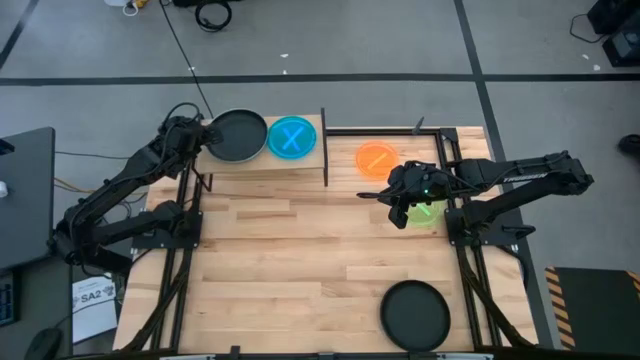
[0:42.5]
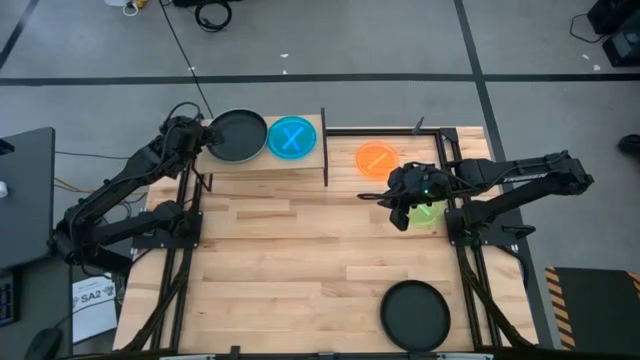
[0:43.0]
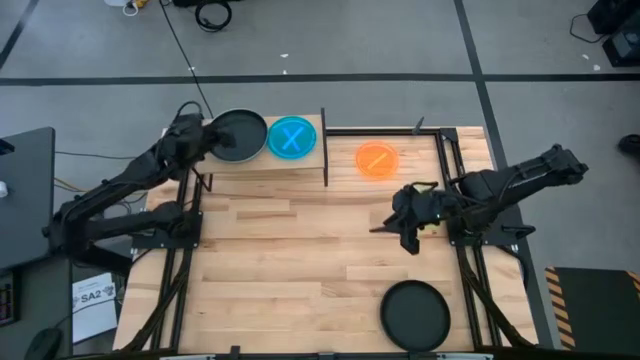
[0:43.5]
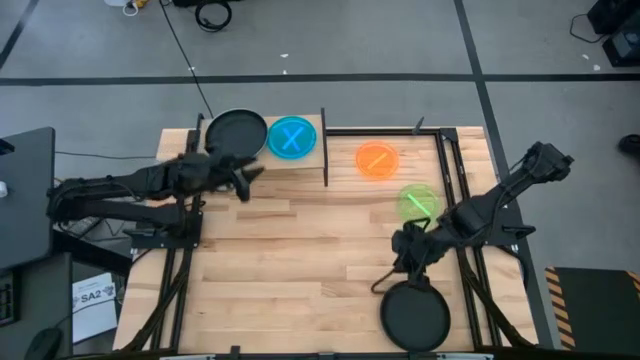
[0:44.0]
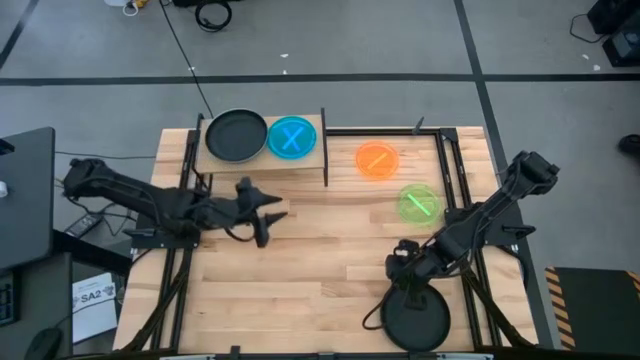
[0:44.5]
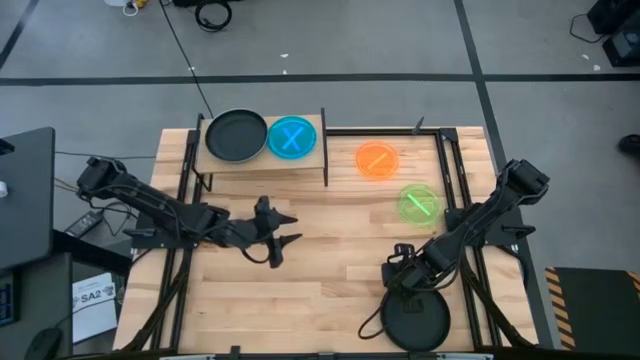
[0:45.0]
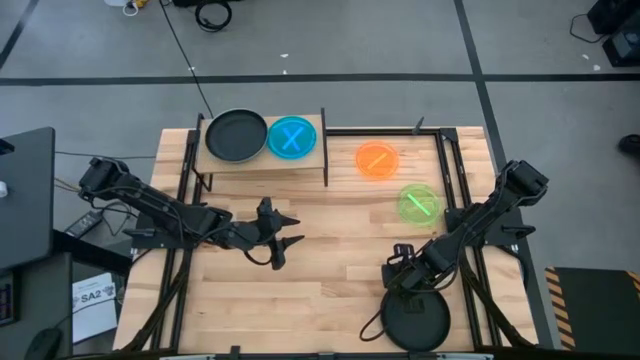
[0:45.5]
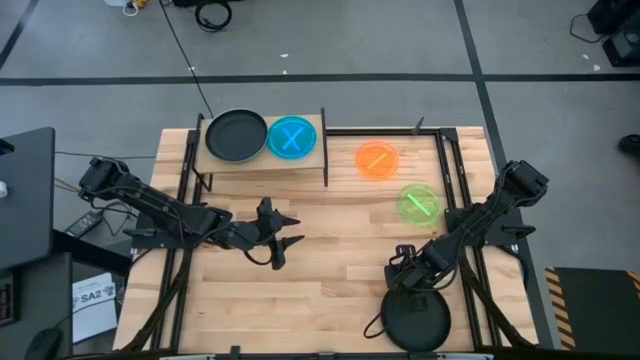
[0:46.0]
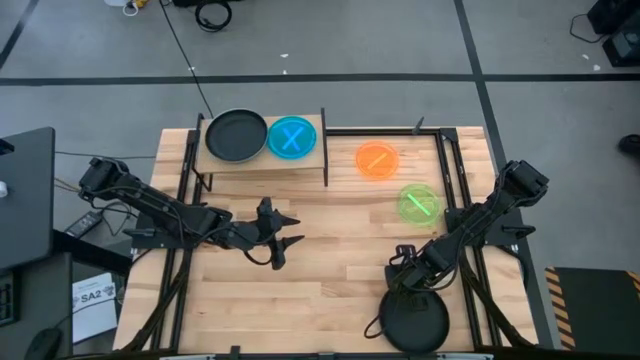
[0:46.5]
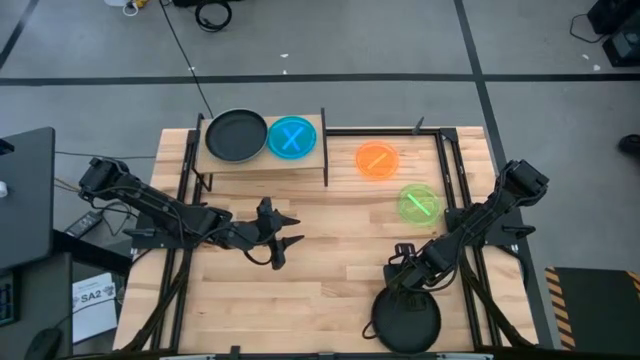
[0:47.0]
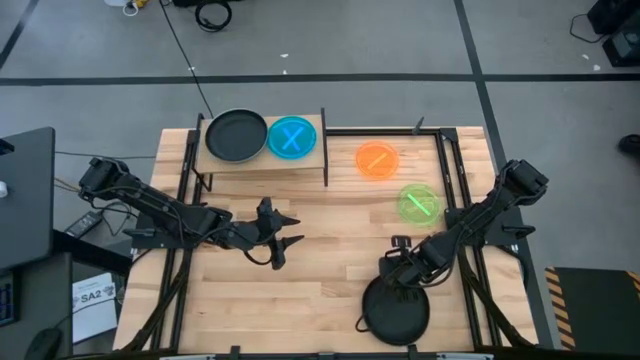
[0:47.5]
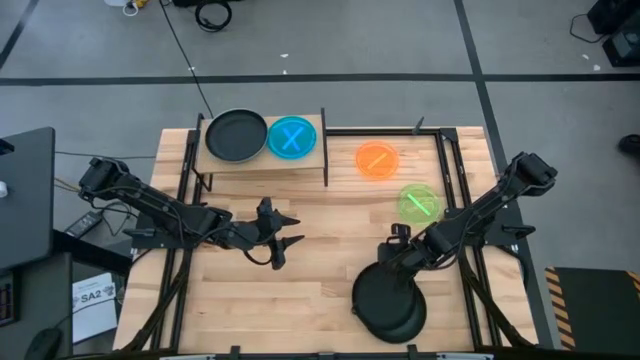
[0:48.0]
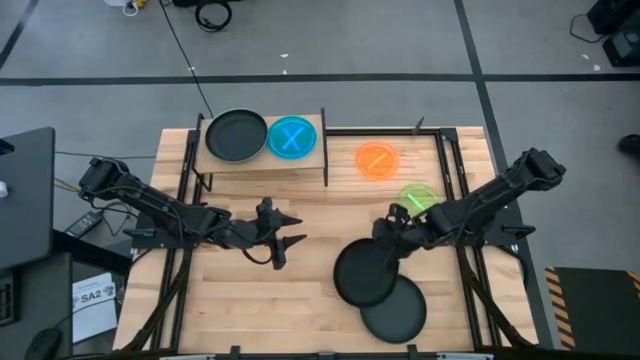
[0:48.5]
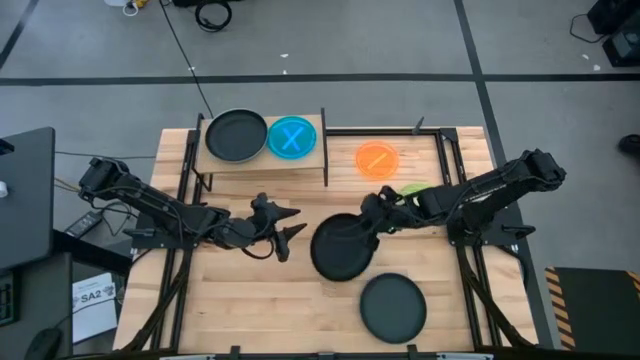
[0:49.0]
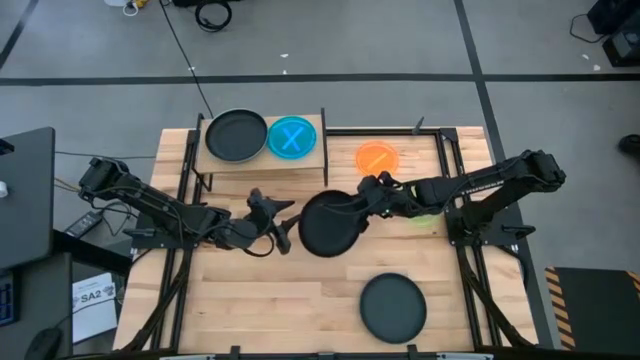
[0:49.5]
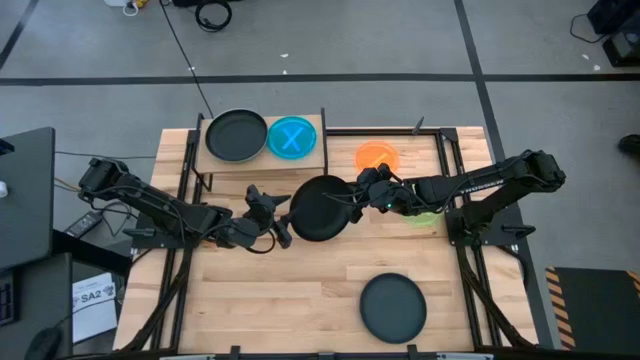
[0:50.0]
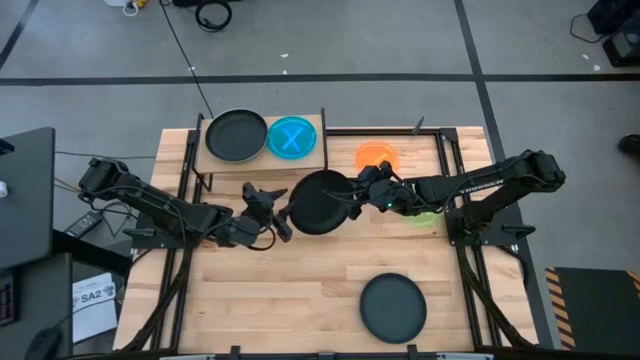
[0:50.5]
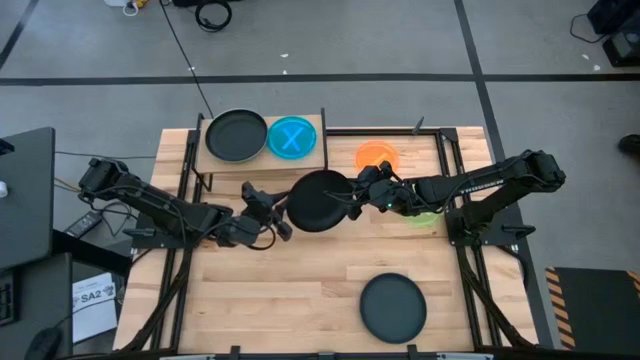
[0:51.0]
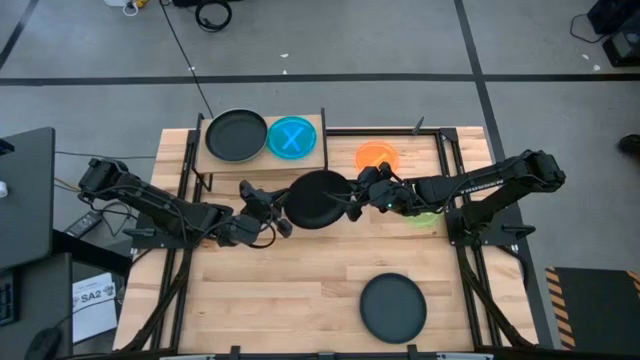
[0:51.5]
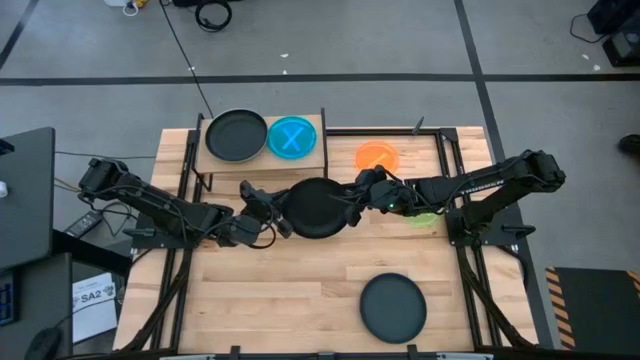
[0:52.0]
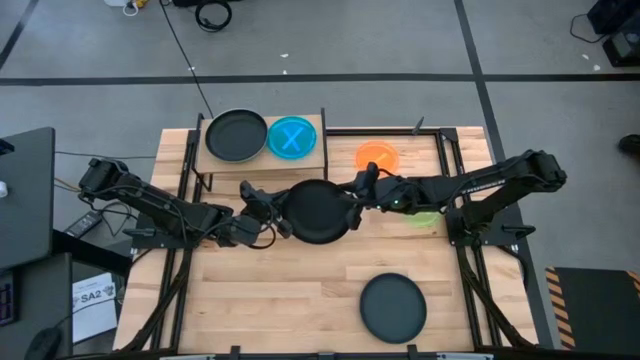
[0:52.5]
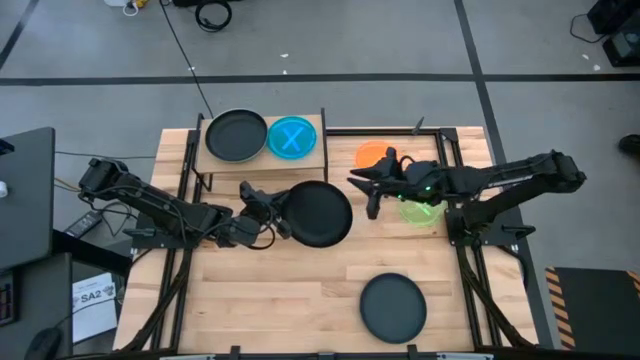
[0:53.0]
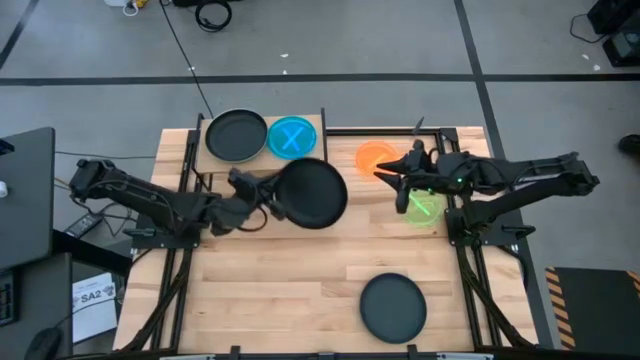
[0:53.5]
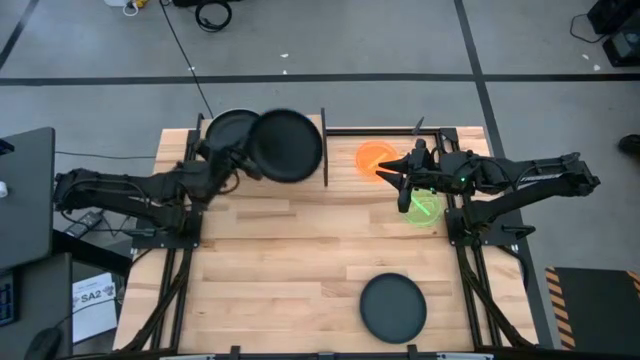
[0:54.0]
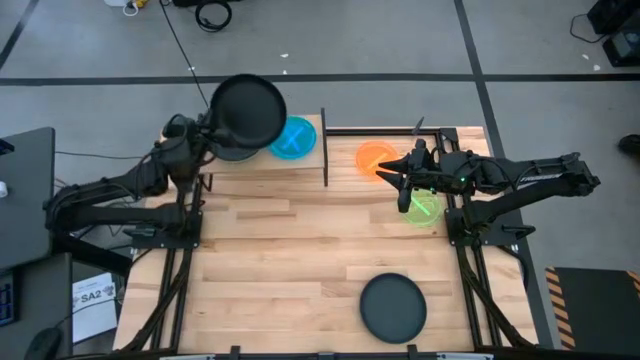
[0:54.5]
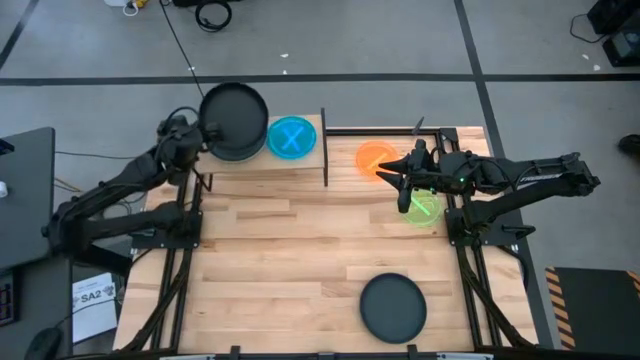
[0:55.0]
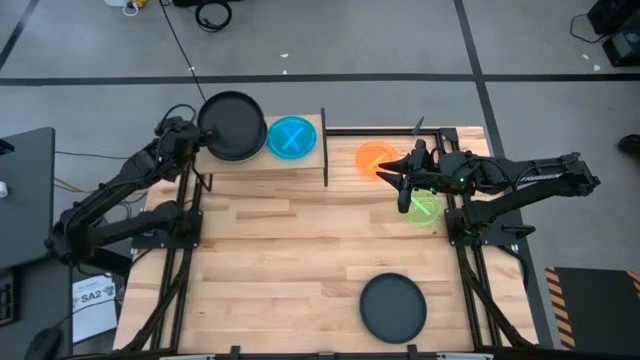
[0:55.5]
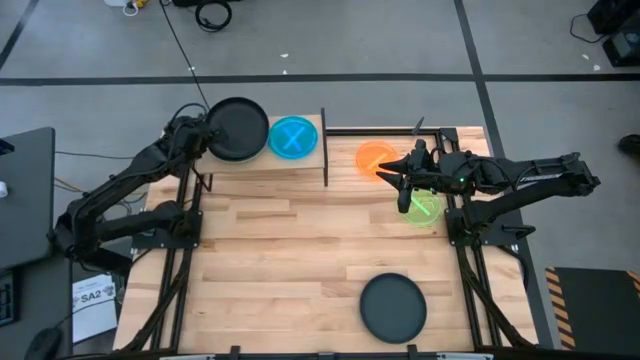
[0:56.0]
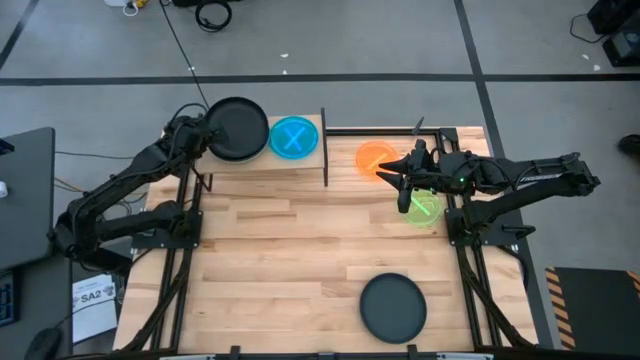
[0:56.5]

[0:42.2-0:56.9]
Task: Place and stack plates onto a shelf
Stack the black plate on top of the black plate on the shelf

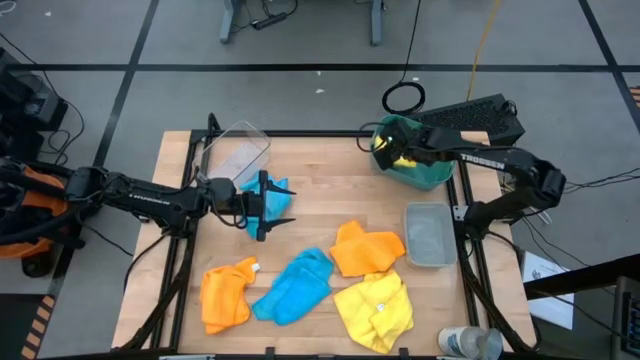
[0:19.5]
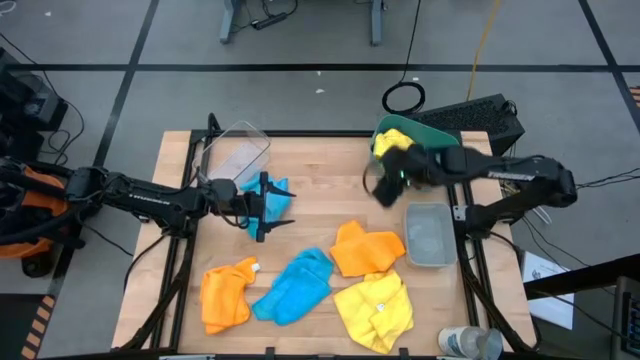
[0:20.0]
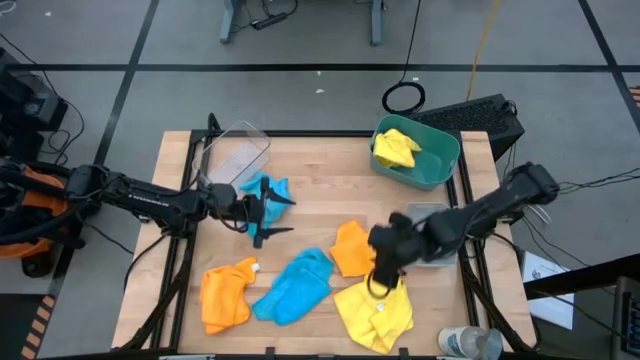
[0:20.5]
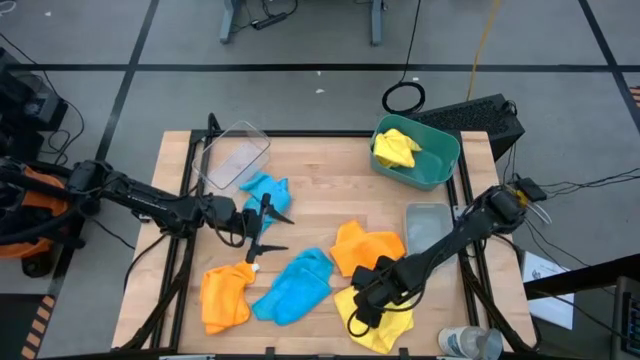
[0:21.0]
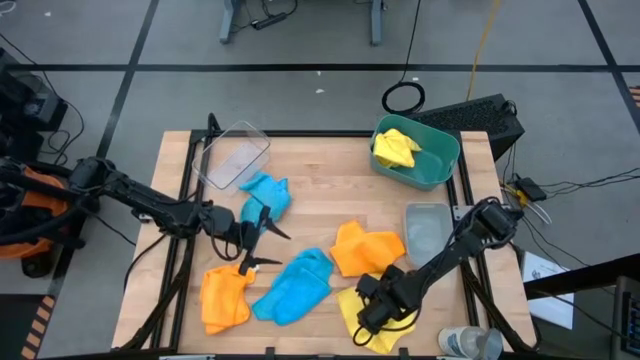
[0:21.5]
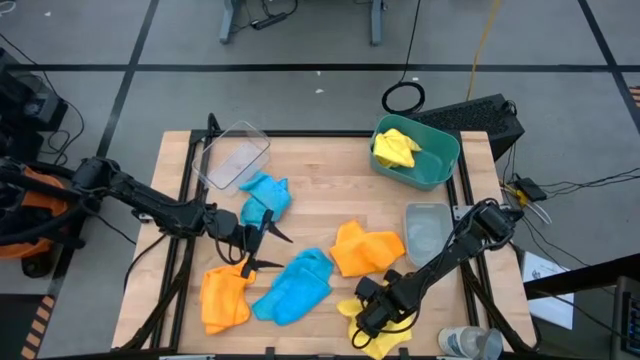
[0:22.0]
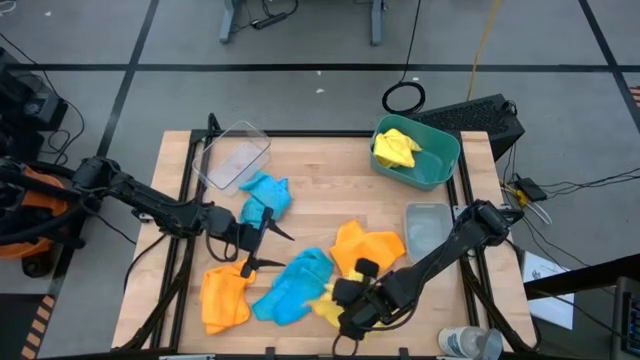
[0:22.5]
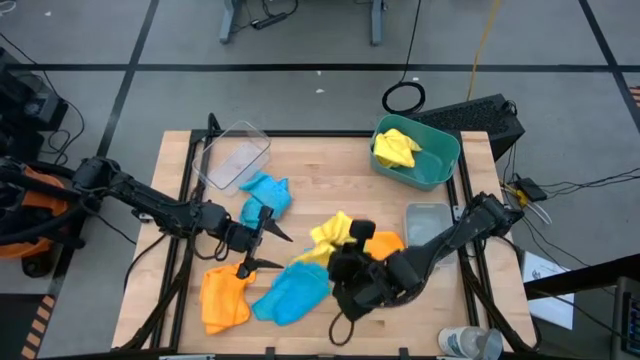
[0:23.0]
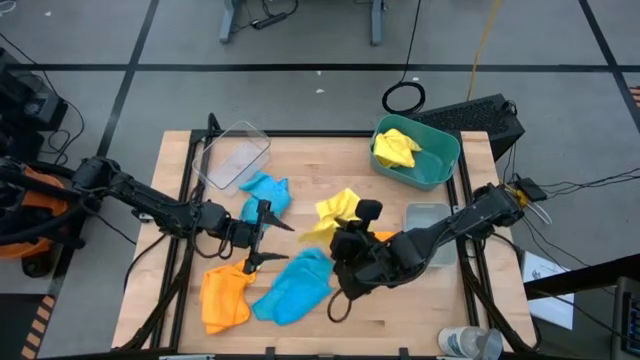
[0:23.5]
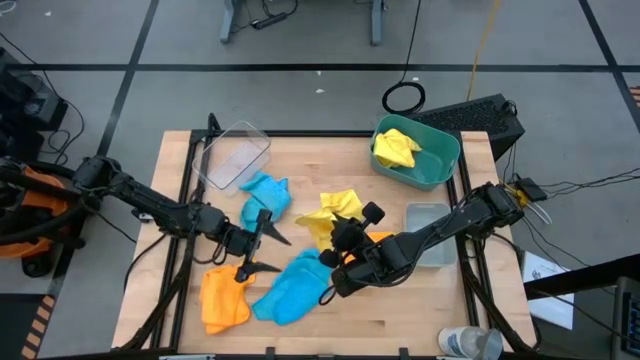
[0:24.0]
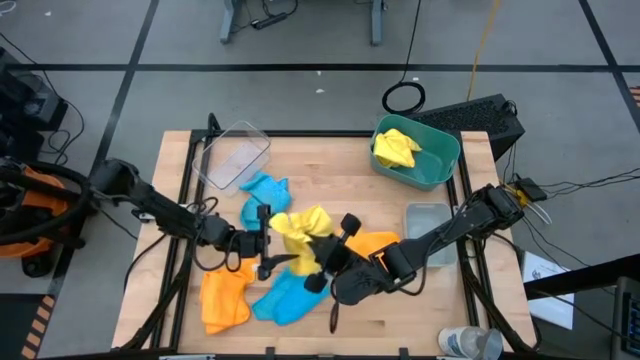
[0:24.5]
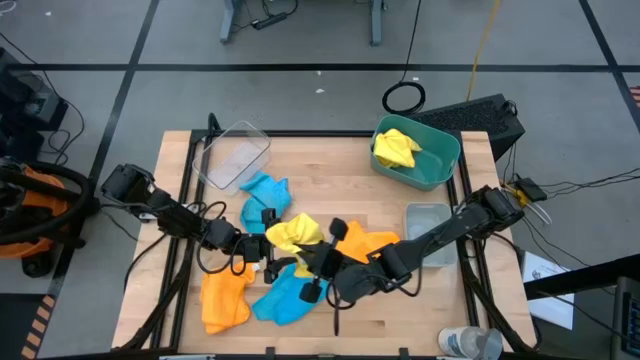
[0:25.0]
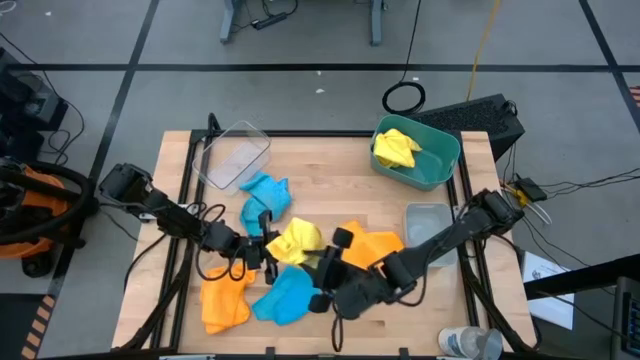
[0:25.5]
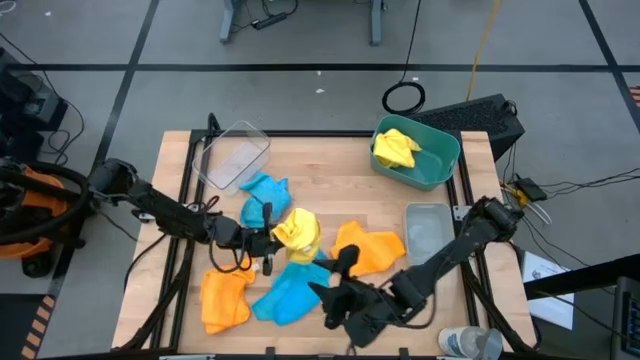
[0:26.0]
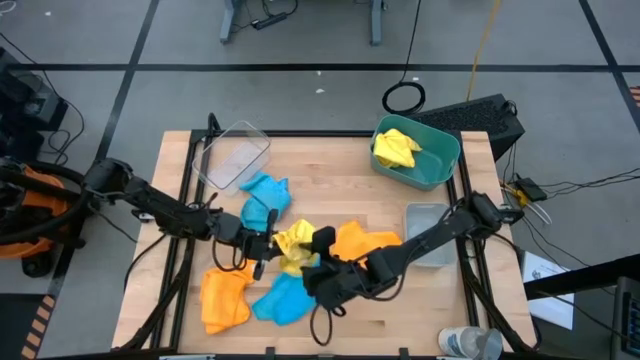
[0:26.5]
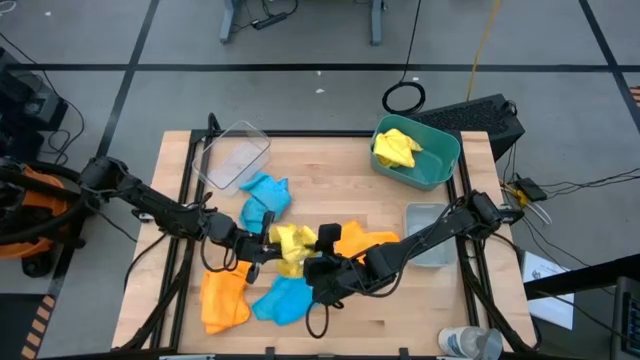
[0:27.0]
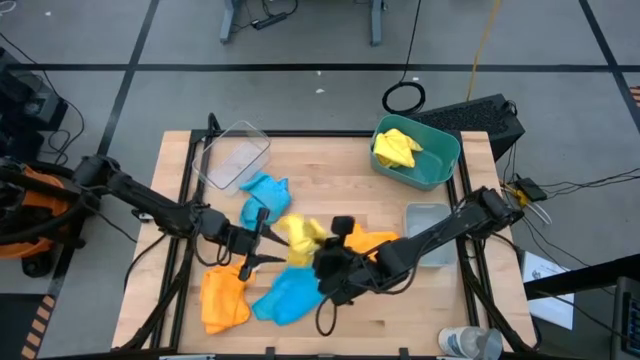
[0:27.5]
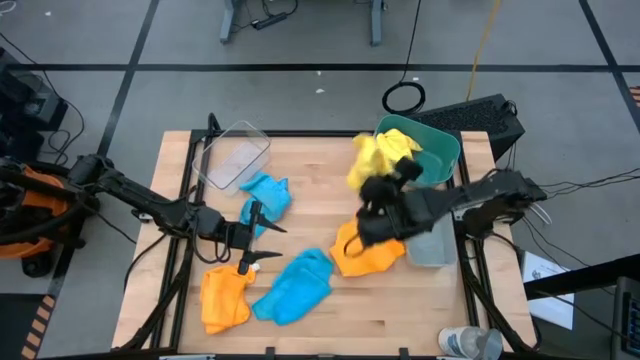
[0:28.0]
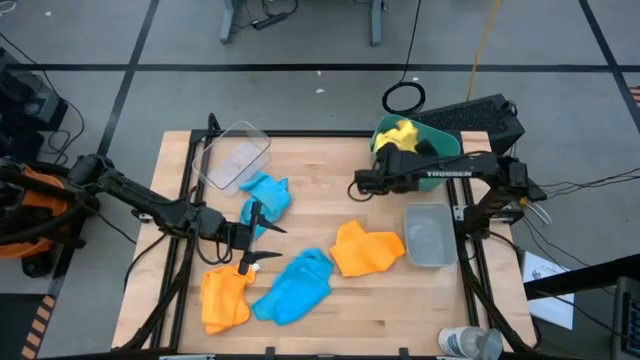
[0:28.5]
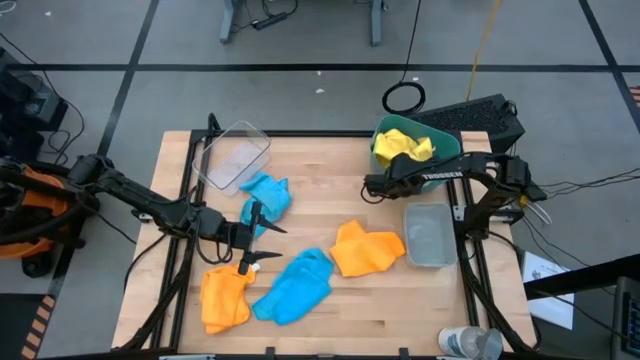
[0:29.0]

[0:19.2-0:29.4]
Task: Sort microfiber towel by color & place in baskets
Put the yellow towel into the green bin
